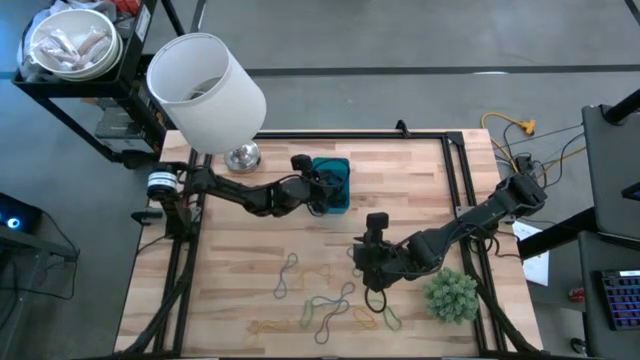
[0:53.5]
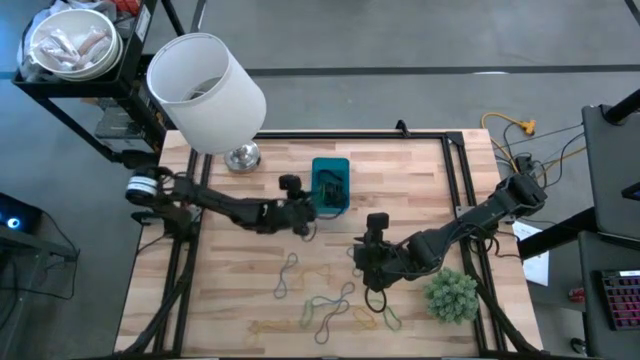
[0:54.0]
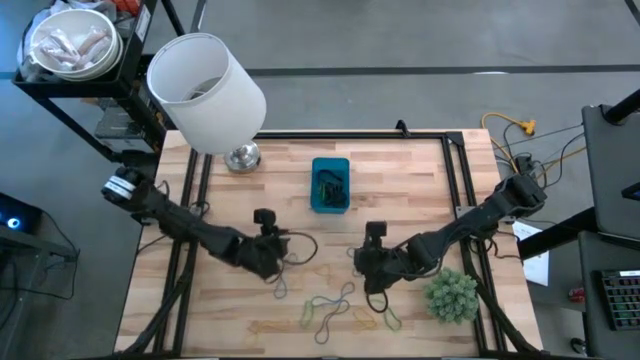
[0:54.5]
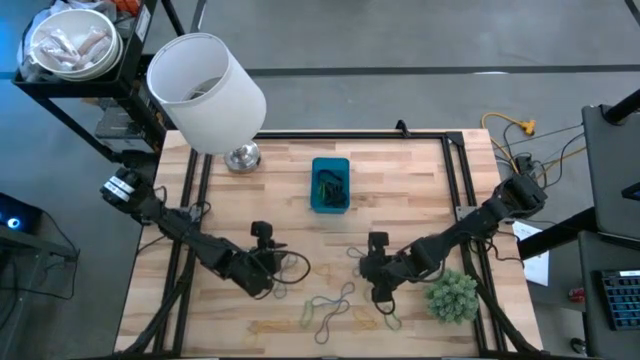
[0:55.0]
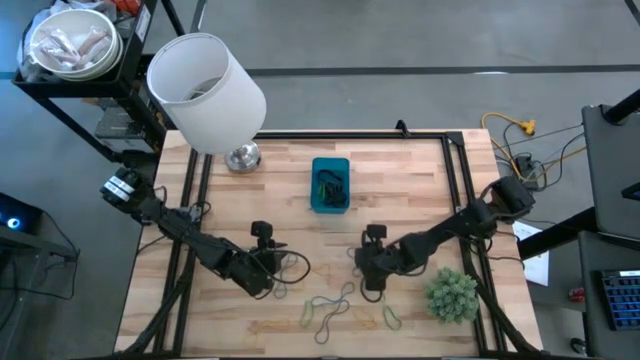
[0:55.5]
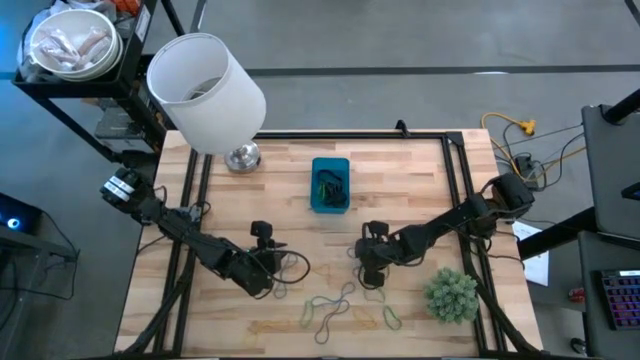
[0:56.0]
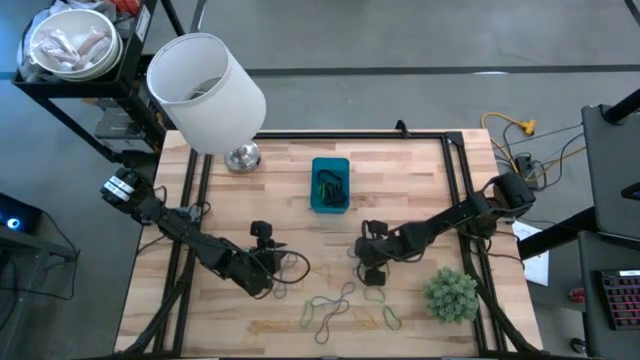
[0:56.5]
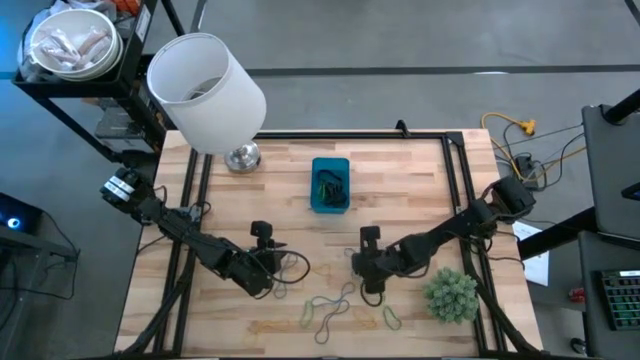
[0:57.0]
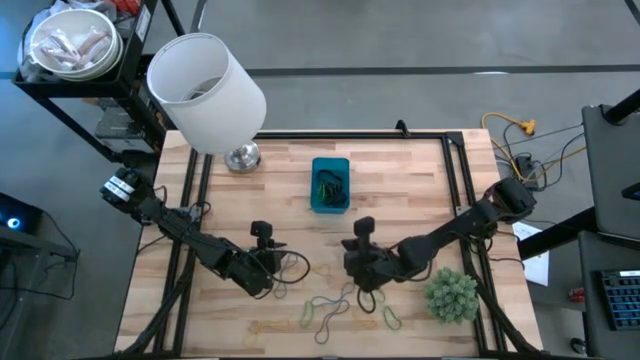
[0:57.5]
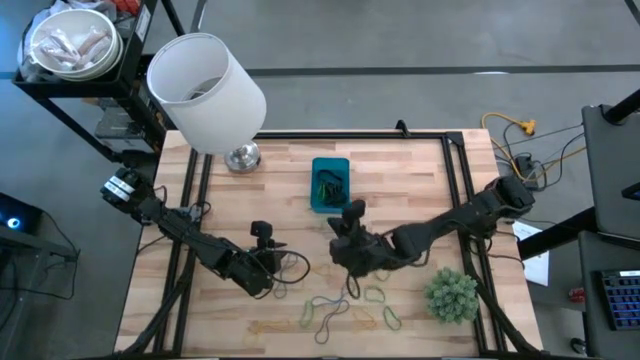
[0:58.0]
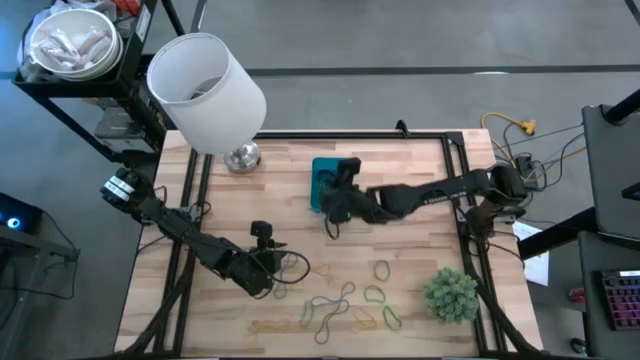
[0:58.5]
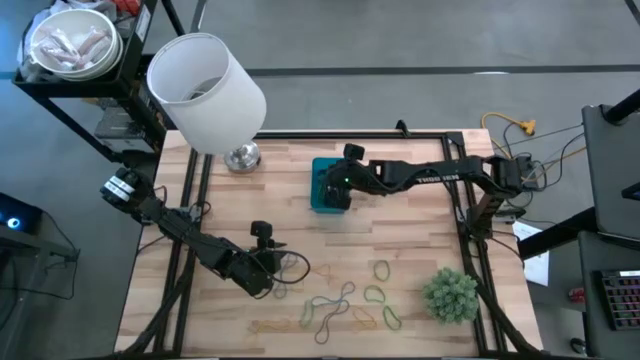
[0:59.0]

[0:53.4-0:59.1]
Task: Pick and place rubber bands into bin
Put the blue rubber band into the blue bin

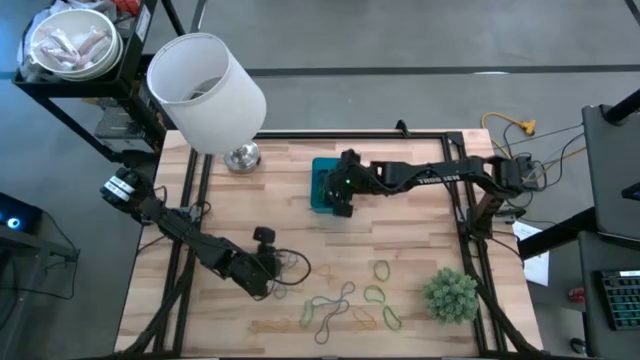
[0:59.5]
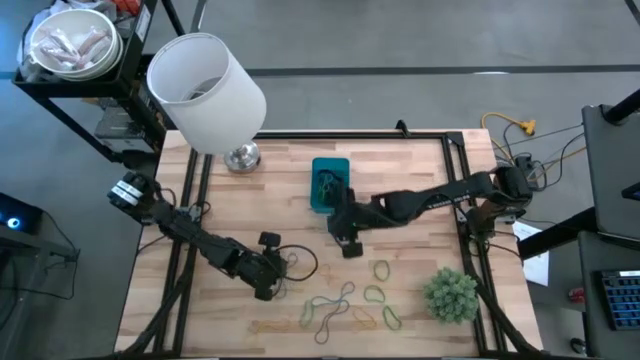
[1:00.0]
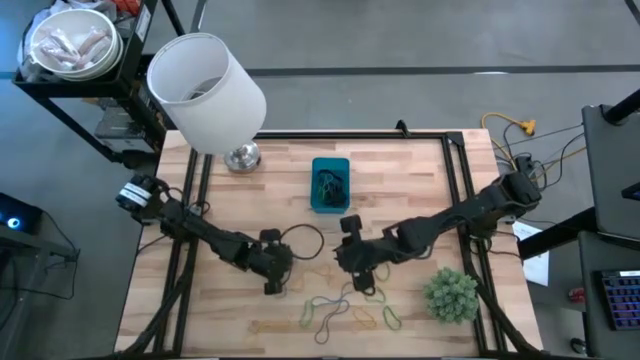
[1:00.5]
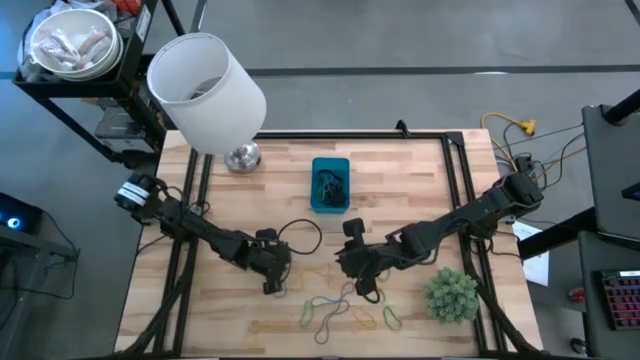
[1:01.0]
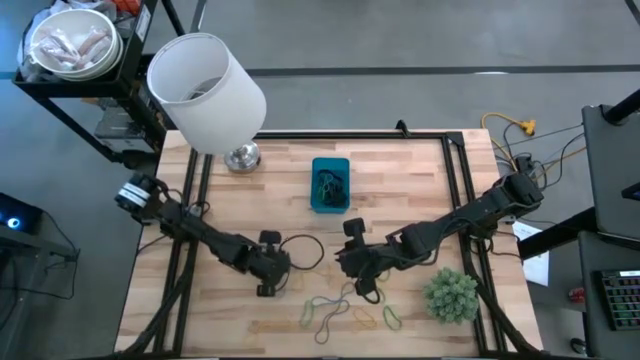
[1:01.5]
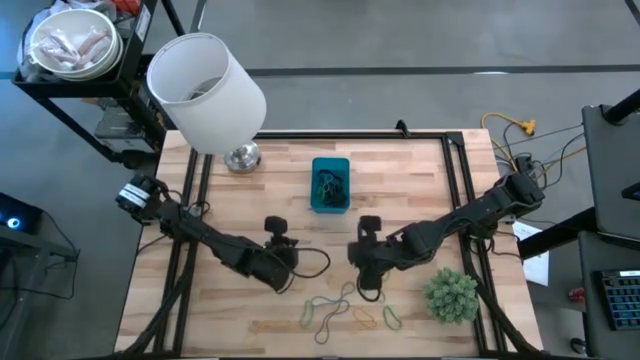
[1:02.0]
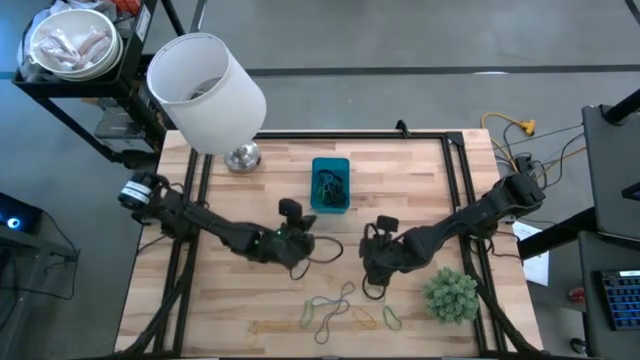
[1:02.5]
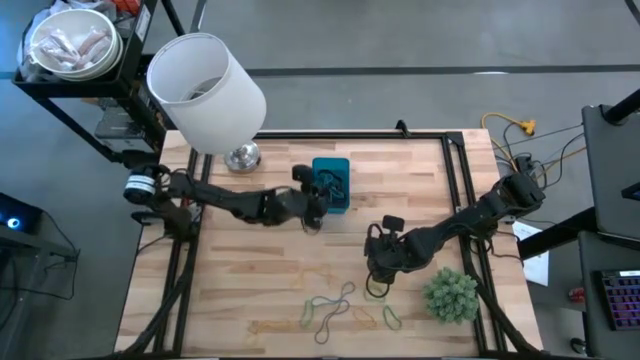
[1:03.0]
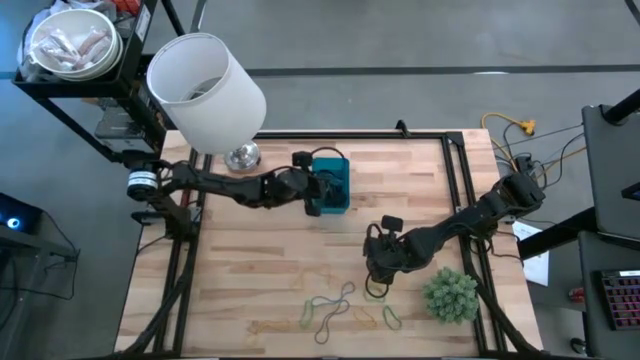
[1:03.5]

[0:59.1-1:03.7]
Put the blue rubber band into the blue bin

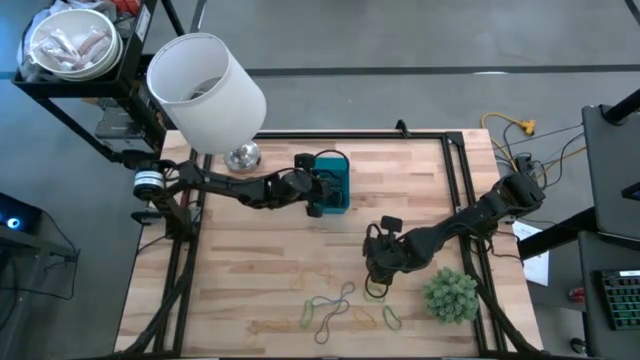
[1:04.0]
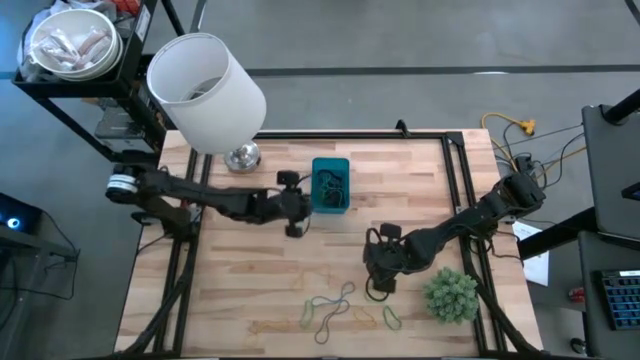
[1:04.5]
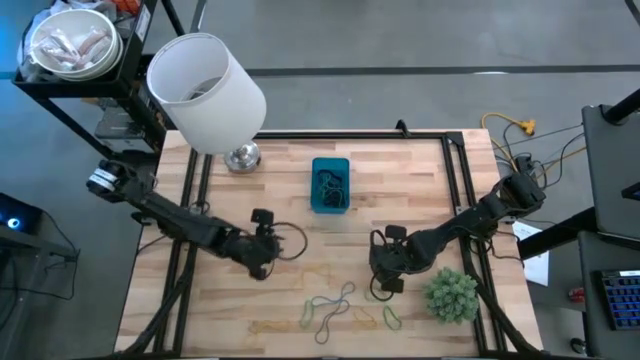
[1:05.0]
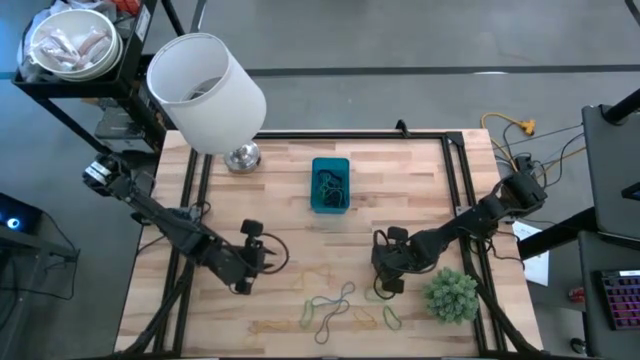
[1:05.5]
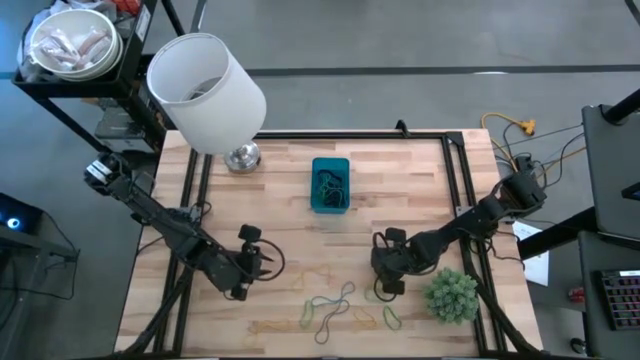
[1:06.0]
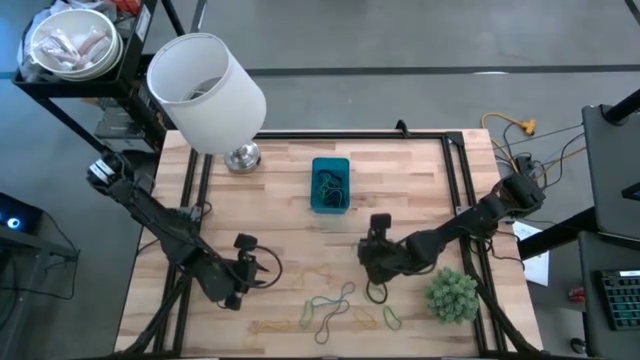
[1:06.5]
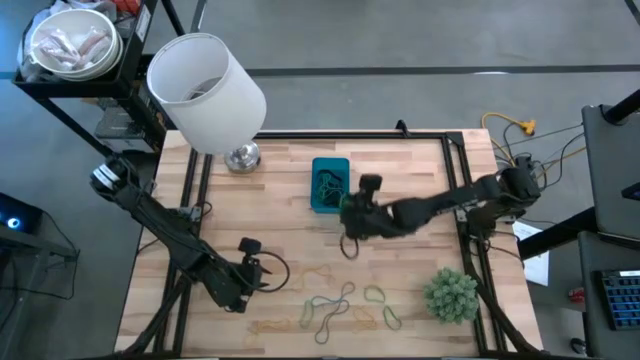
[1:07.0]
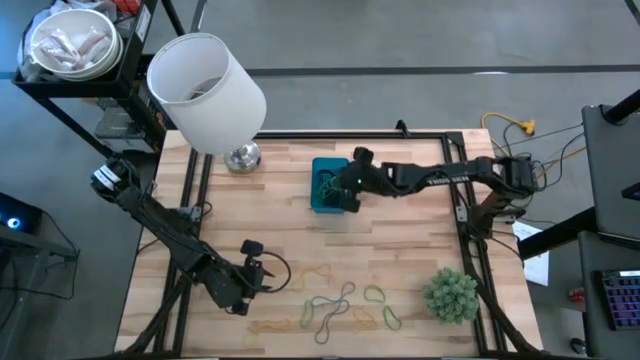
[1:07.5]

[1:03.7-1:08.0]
Put the green rubber band into the blue bin

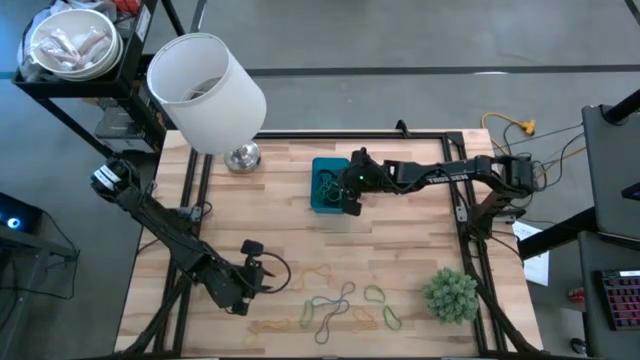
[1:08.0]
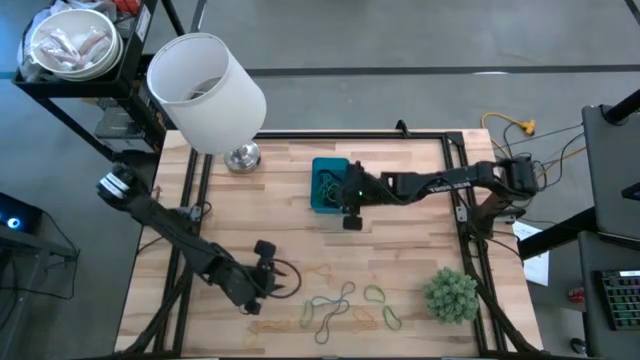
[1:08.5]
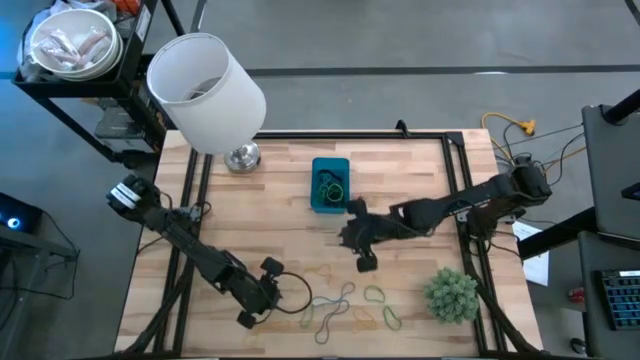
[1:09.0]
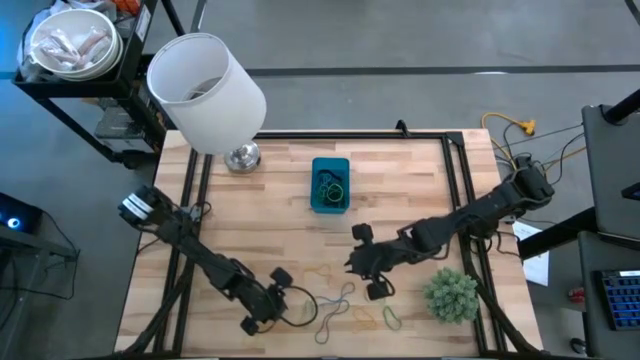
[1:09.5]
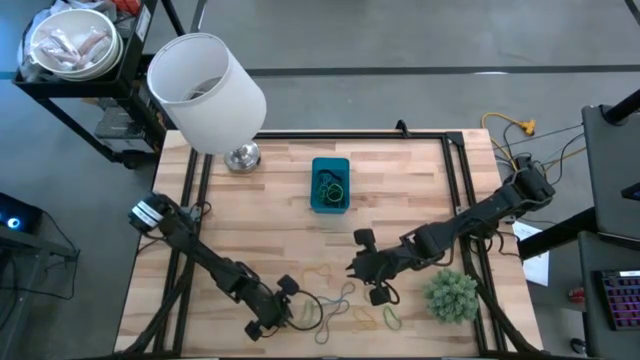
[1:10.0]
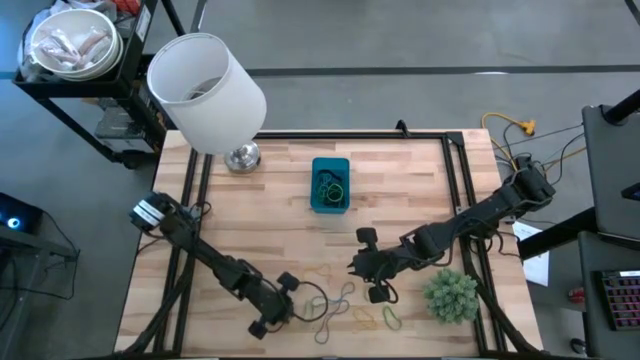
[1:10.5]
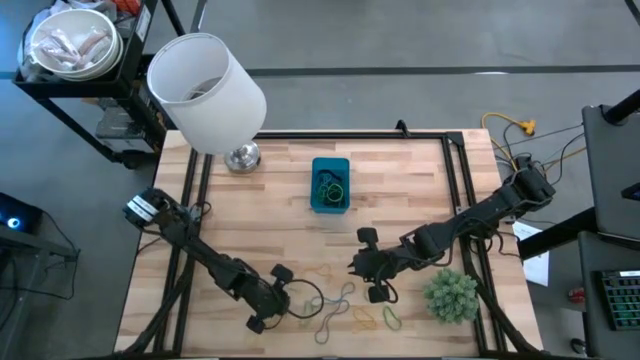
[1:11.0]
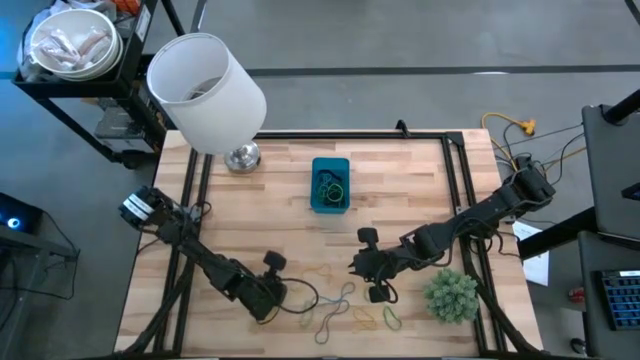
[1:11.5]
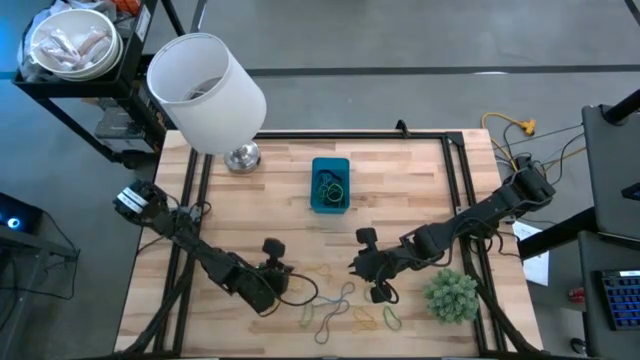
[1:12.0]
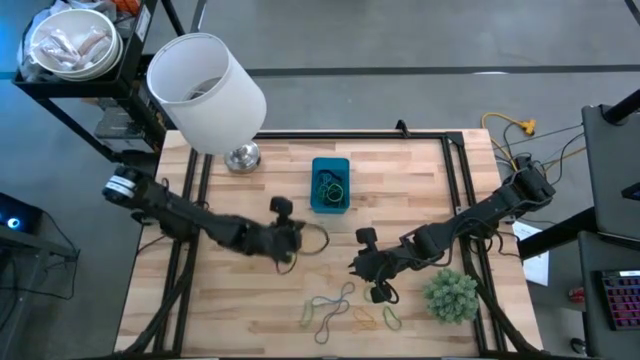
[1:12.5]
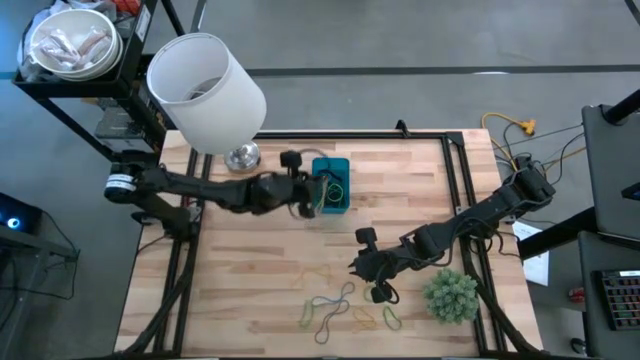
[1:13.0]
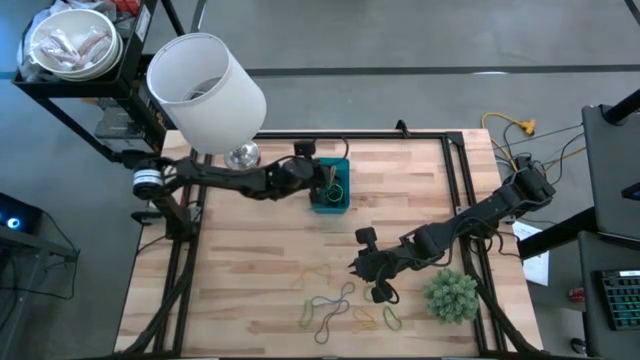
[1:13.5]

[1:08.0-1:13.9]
Put the yellow rubber band into the blue bin

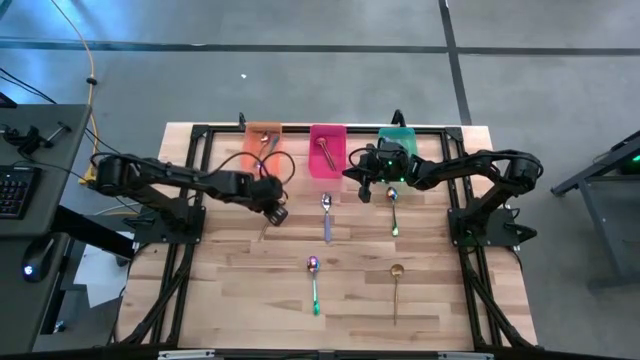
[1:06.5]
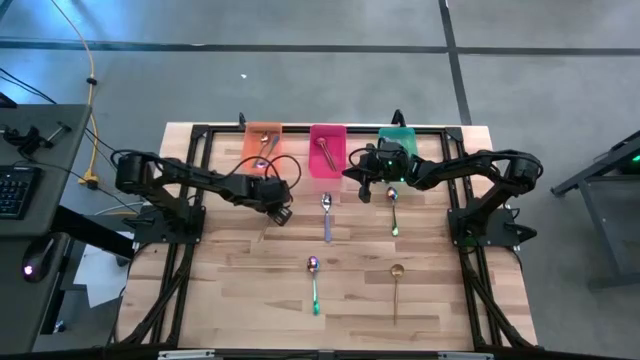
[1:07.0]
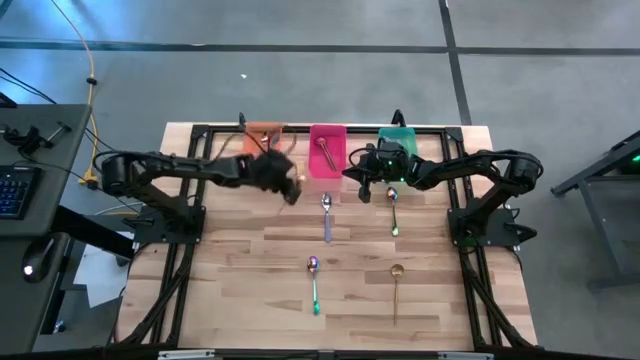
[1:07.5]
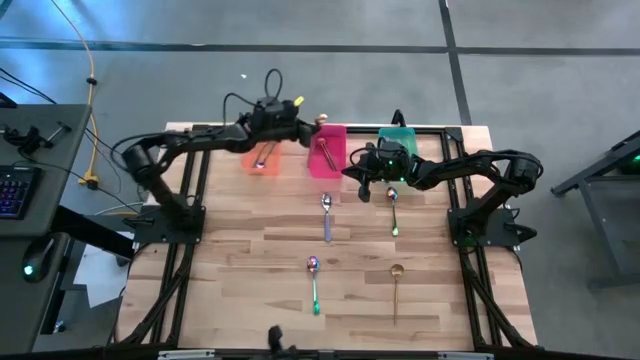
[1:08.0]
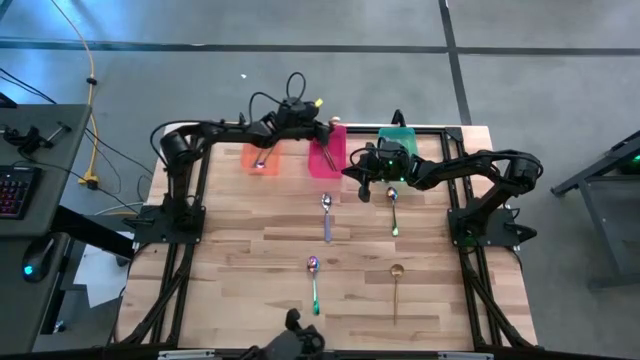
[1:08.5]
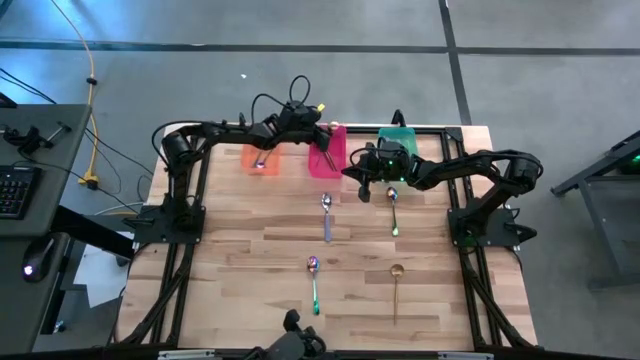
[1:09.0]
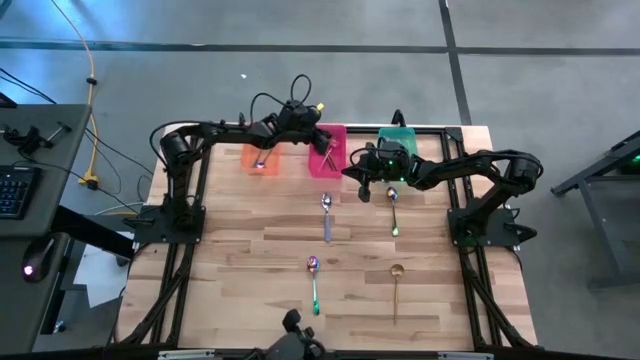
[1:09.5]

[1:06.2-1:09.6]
Task: Sort silverware by color (type)
Put the top yellow spoon into the pink bin
